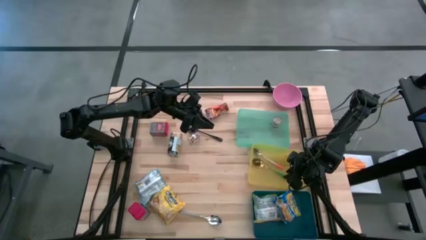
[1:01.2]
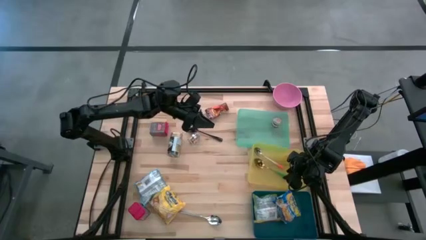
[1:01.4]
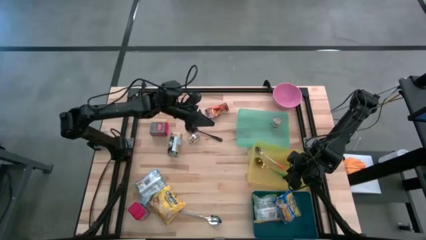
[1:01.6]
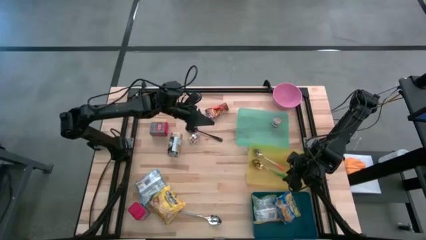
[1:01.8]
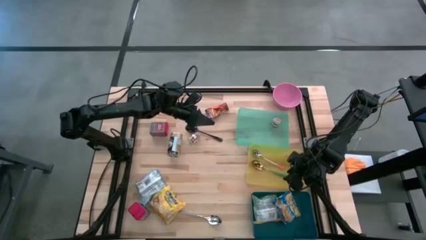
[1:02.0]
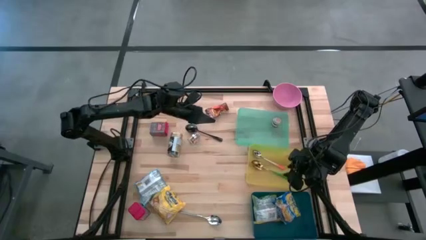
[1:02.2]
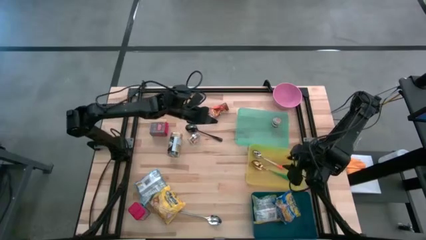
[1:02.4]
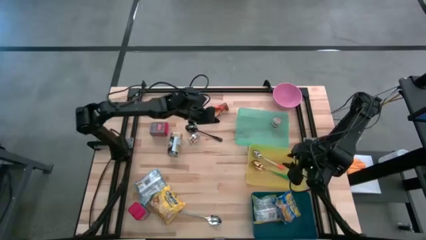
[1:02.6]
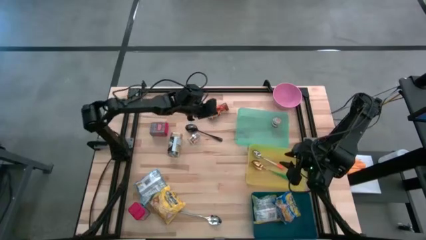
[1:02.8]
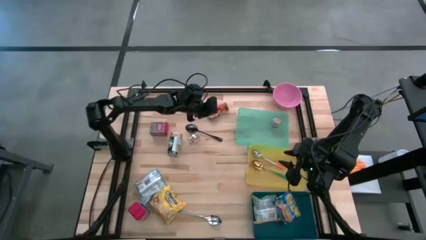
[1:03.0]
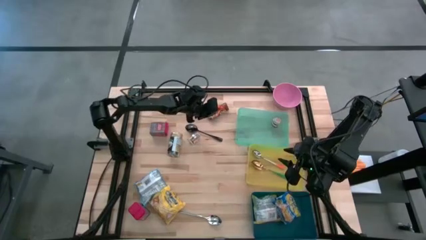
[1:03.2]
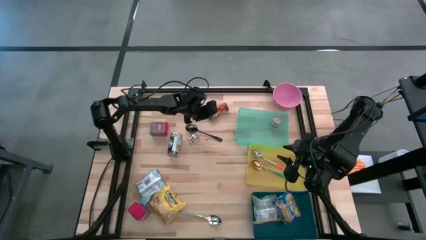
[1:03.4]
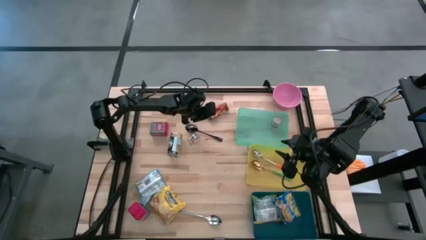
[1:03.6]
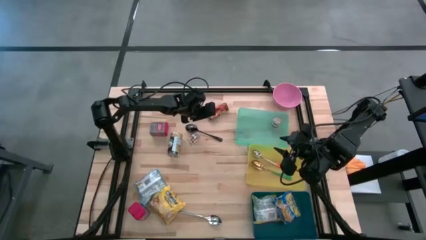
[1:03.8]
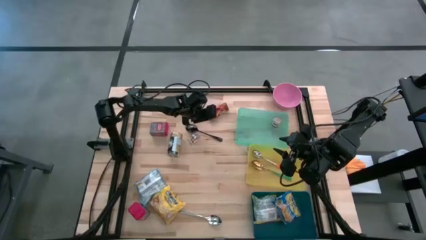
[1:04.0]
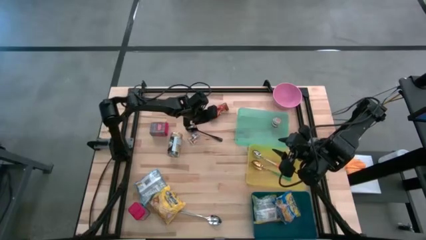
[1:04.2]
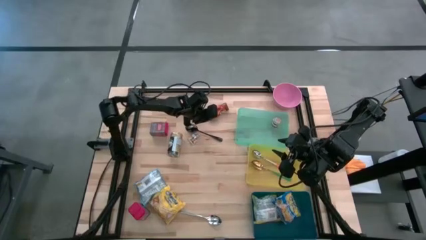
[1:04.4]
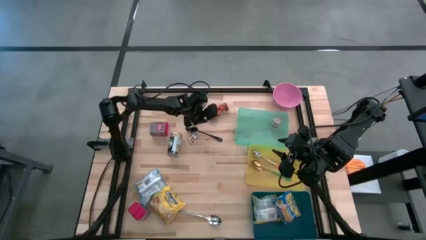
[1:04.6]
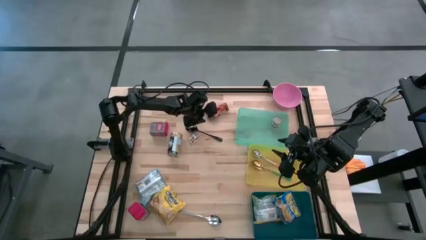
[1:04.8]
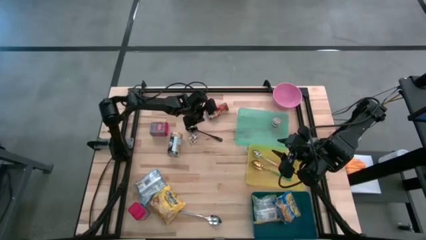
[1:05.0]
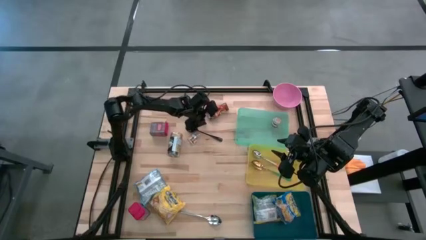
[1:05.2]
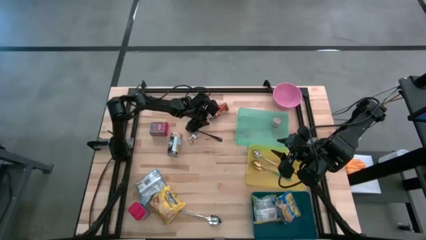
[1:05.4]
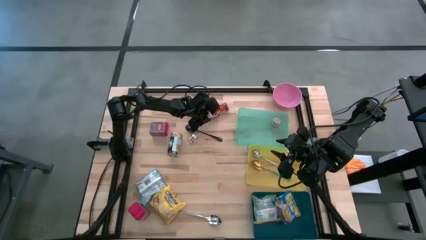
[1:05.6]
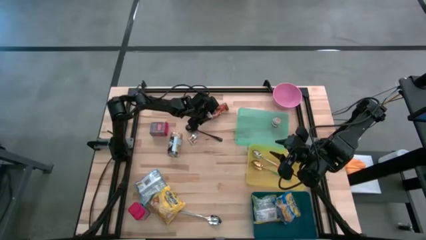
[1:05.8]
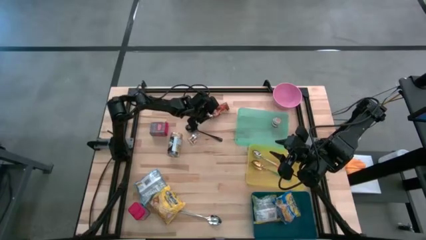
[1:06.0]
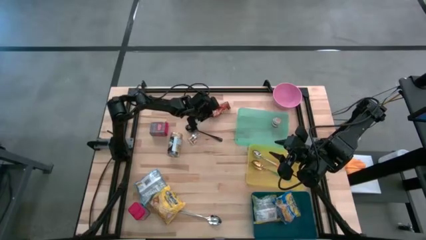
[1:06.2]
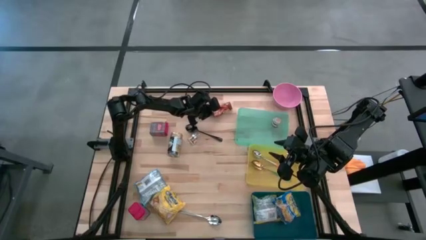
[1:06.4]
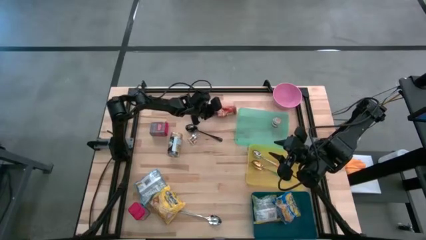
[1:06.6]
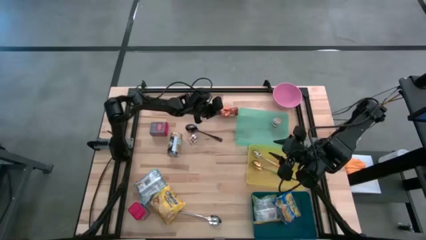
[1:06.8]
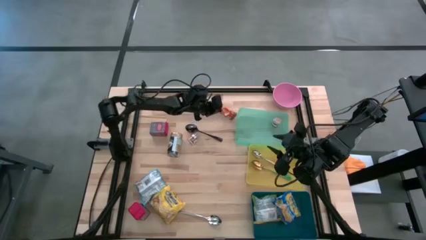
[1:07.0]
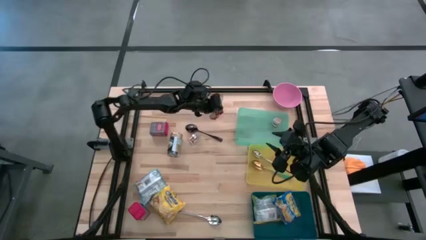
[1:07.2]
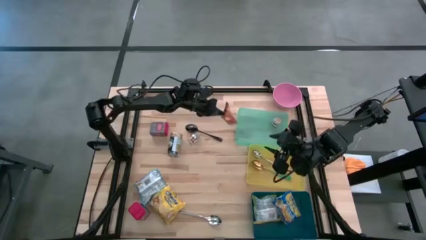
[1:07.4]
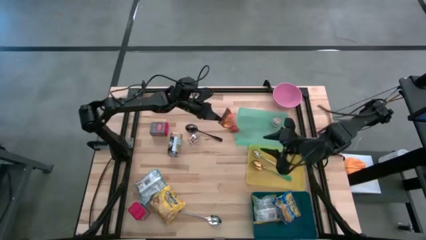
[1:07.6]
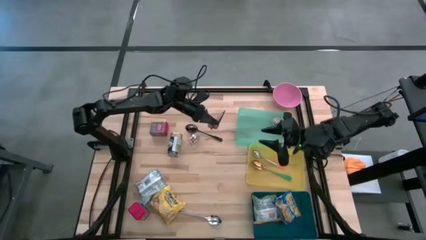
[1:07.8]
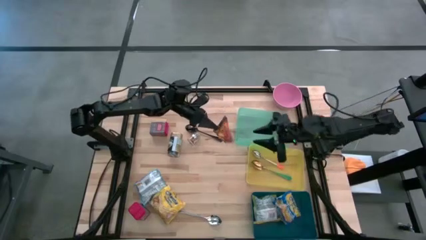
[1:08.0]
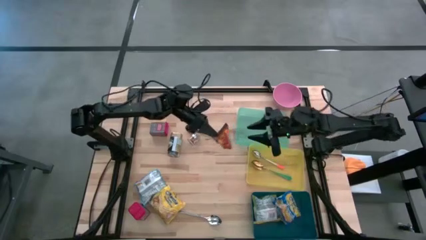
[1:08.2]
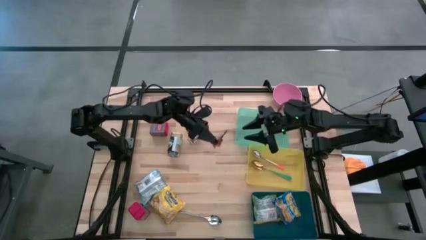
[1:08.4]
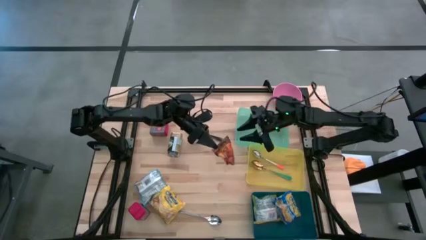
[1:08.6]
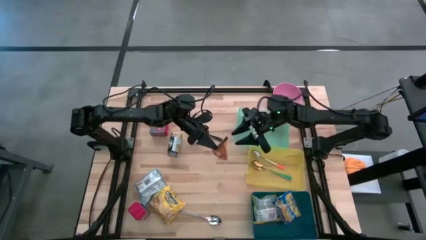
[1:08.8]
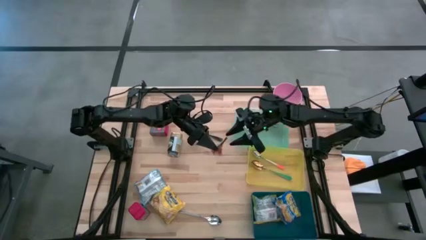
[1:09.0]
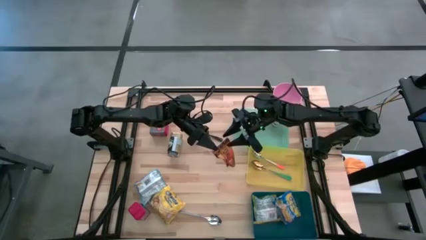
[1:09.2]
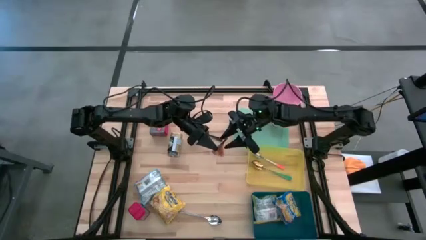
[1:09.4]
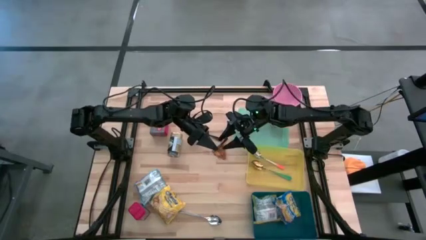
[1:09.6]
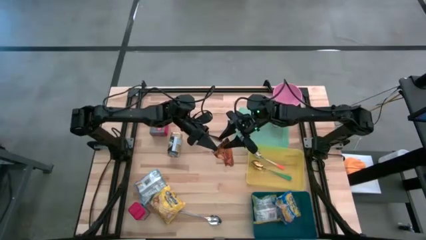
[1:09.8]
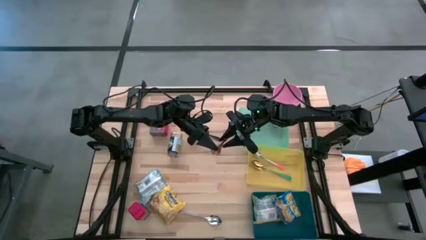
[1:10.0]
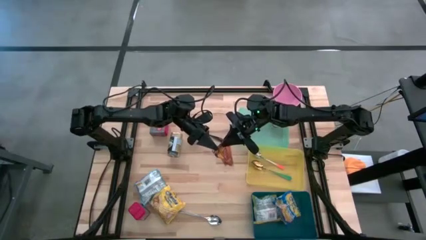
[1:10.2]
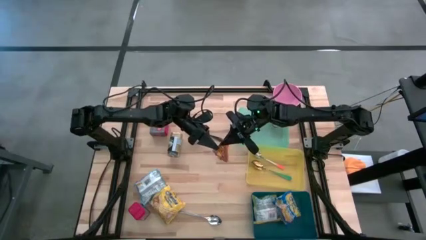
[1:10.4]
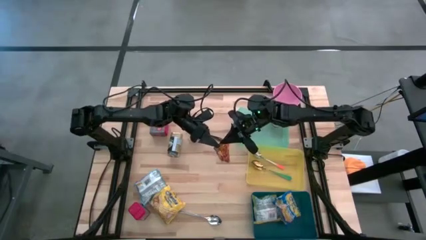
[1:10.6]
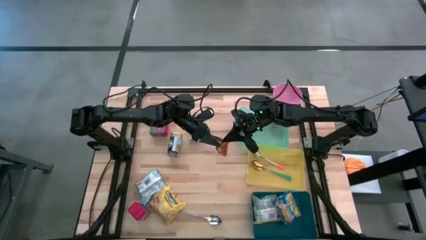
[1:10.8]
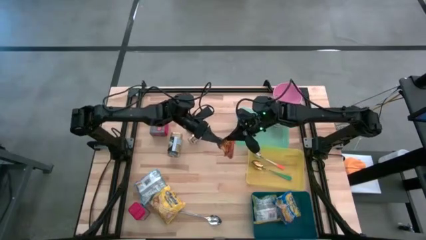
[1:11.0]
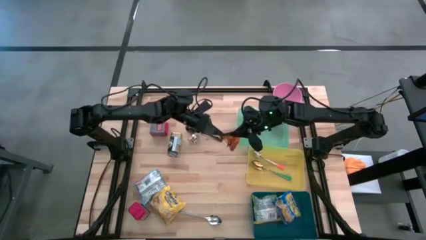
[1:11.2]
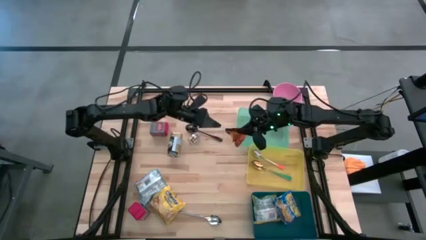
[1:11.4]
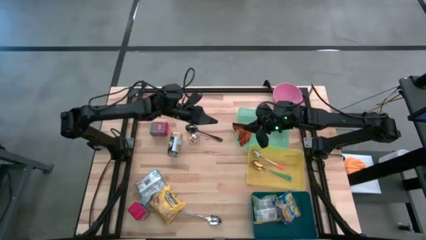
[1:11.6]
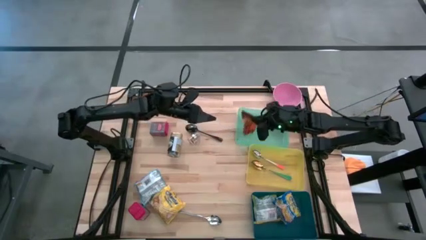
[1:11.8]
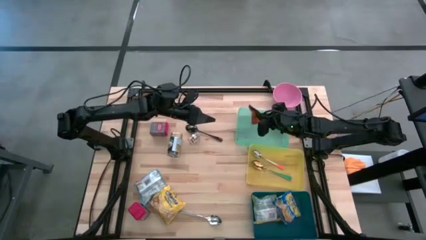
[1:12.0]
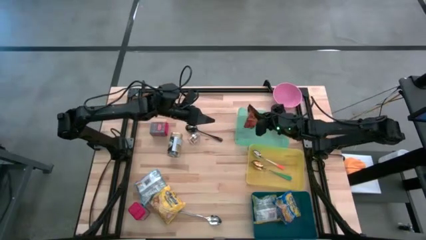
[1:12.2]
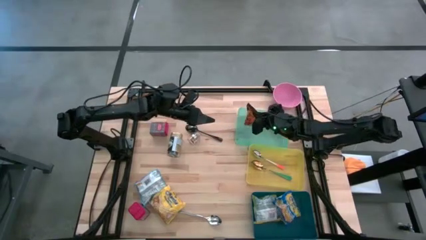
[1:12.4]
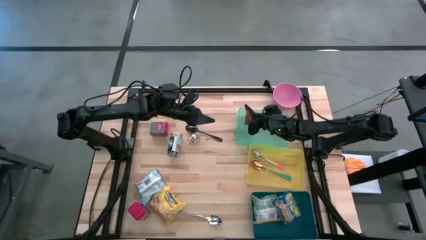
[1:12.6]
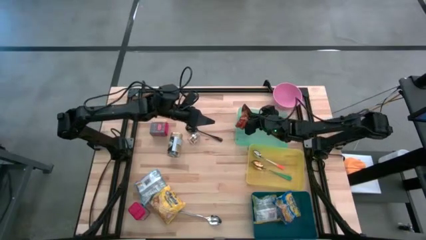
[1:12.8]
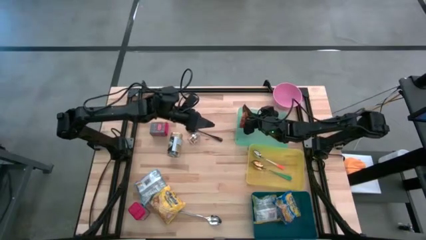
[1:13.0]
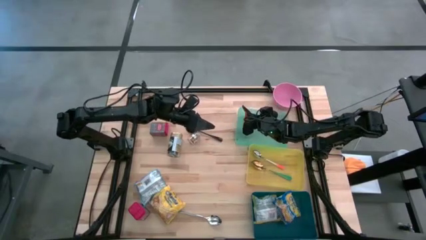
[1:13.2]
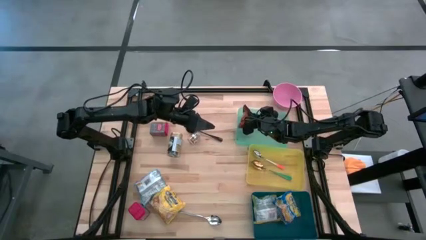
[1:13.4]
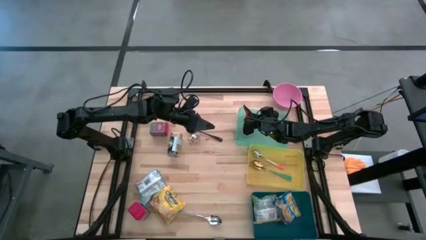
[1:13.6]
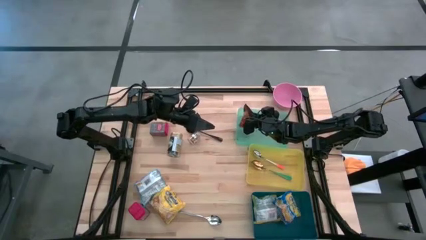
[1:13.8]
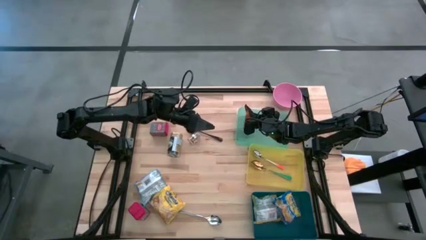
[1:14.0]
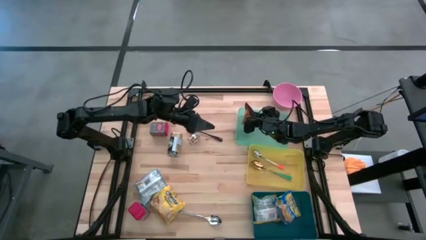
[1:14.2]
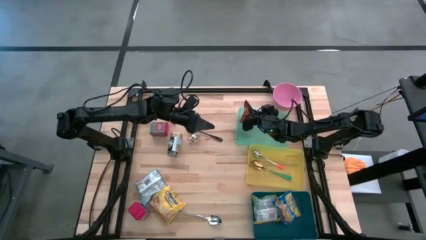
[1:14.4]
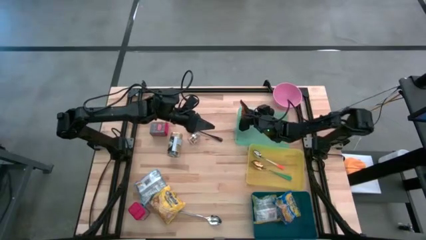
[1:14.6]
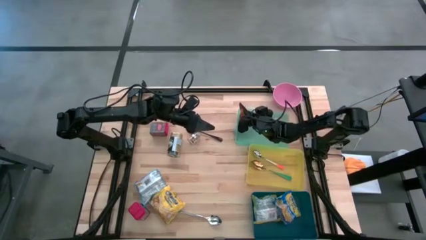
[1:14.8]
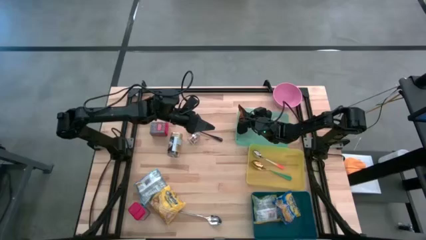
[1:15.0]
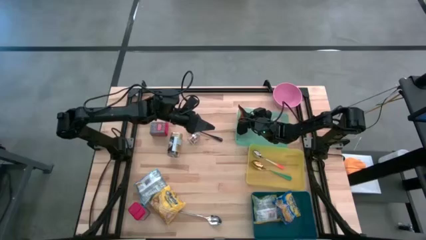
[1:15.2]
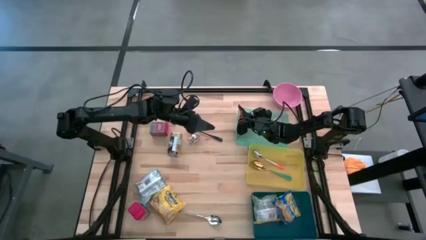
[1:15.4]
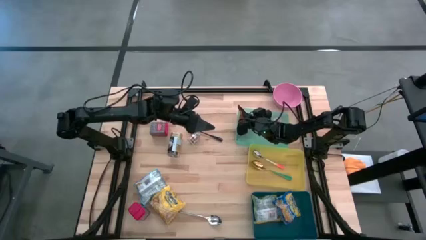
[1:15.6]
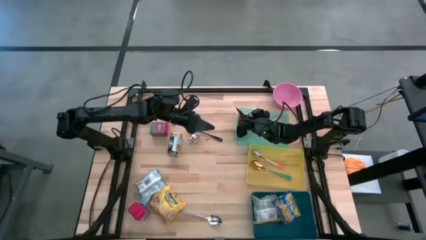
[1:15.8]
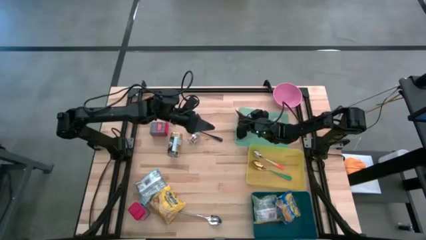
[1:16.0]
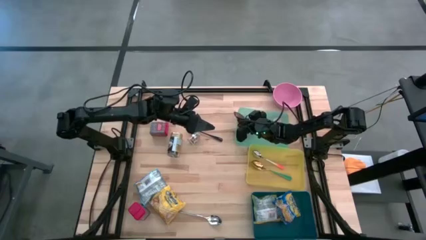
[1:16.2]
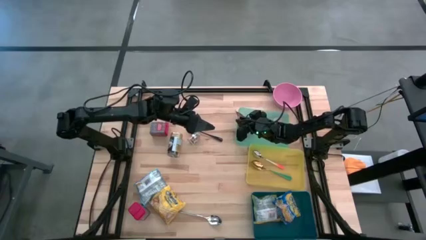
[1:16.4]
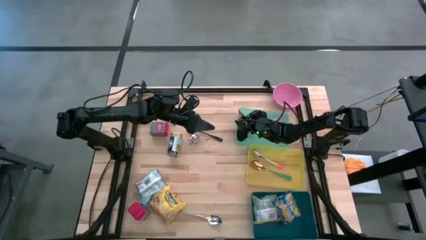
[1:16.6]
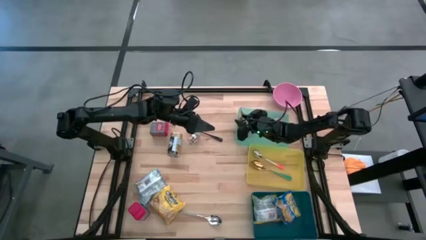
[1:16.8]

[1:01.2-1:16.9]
Put the orange seasoning pack into the green bin
